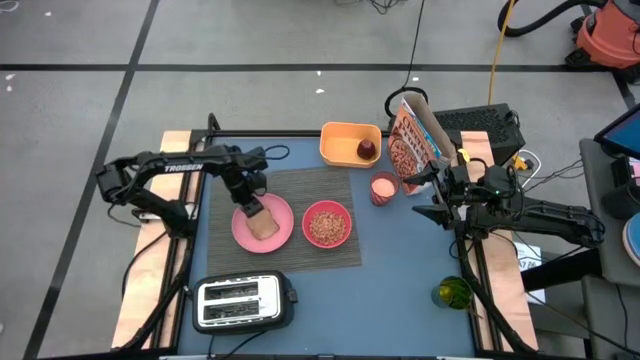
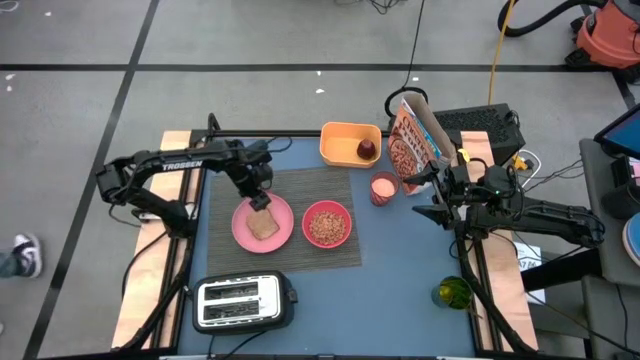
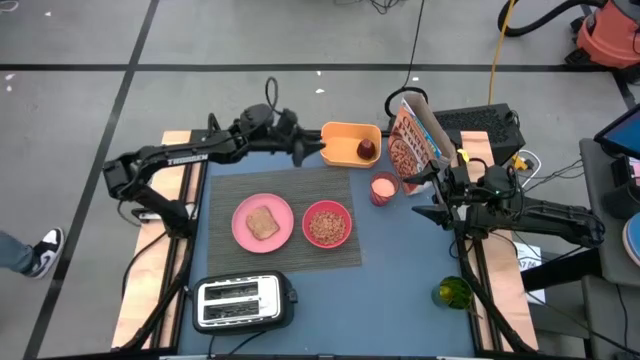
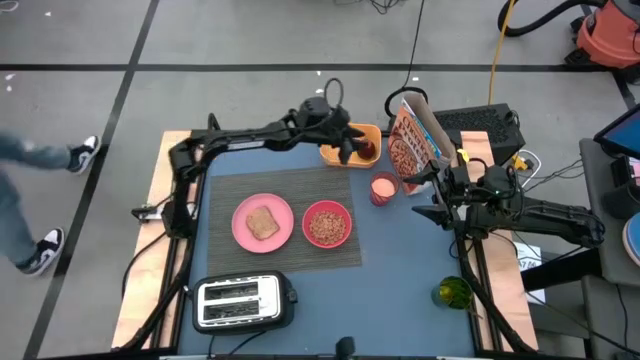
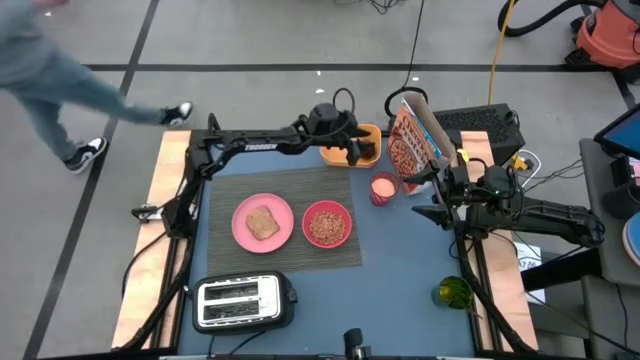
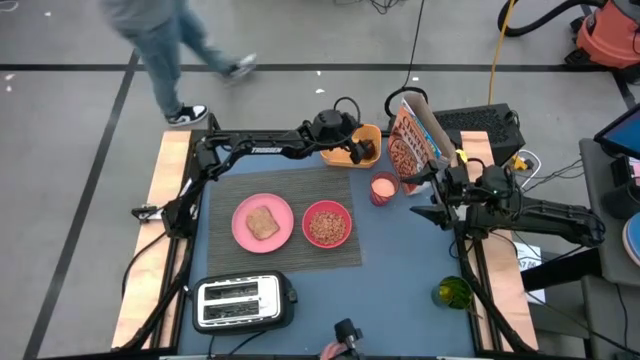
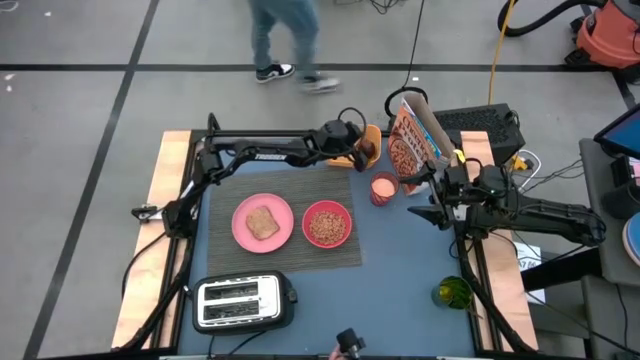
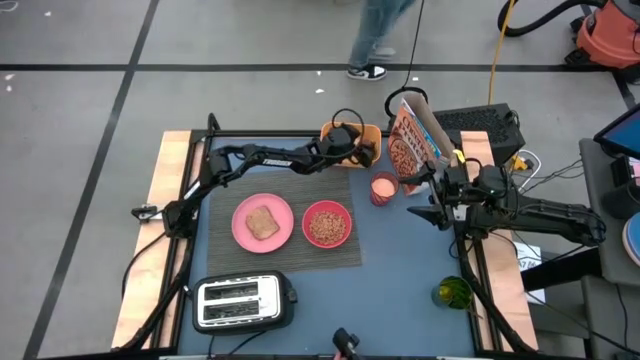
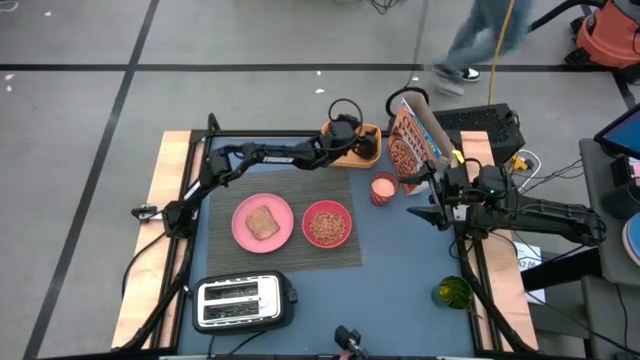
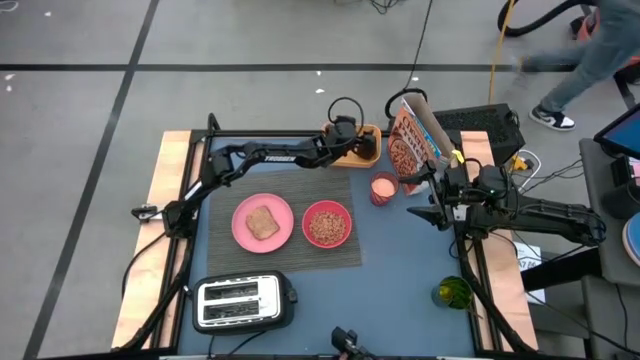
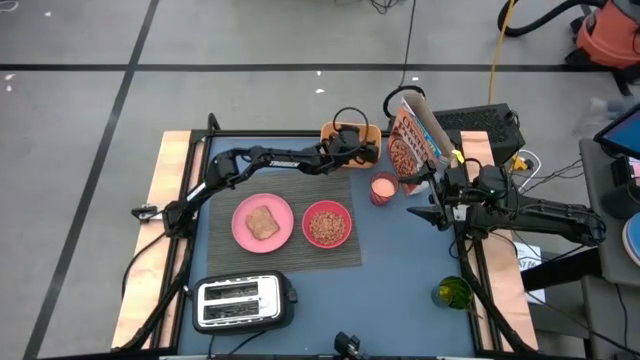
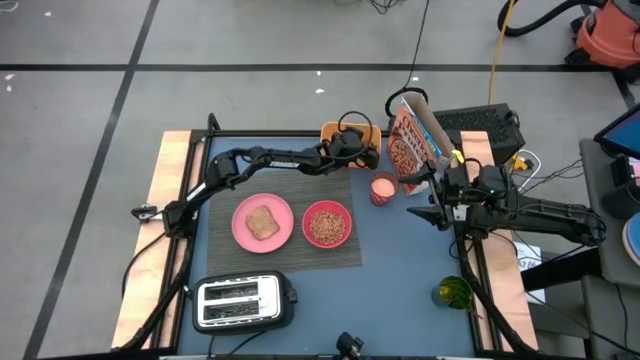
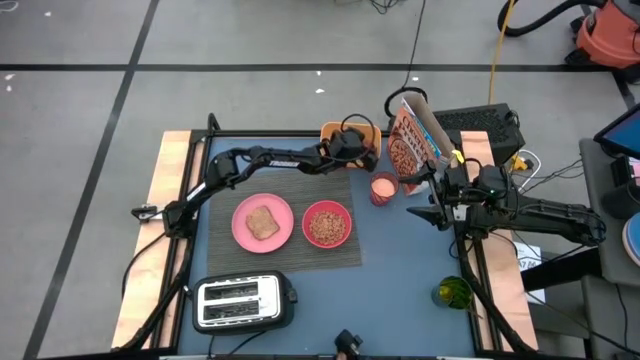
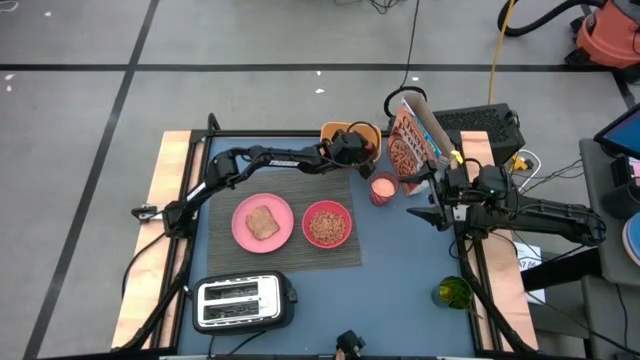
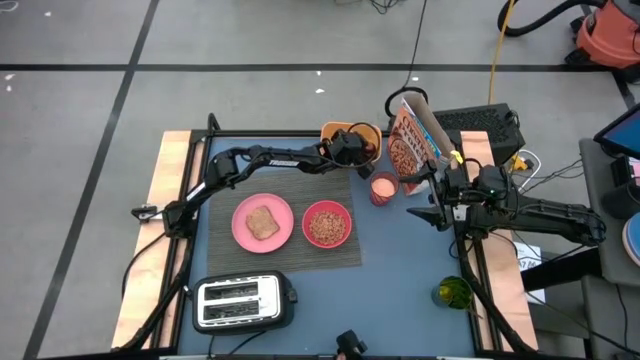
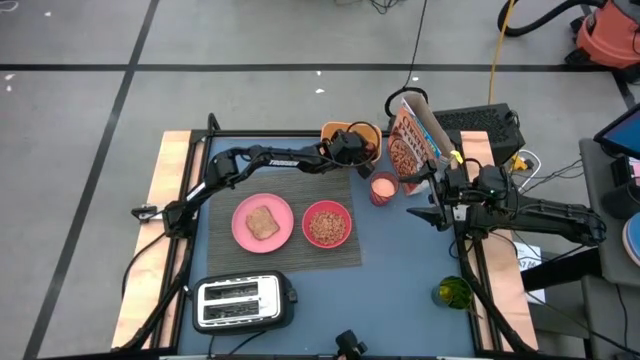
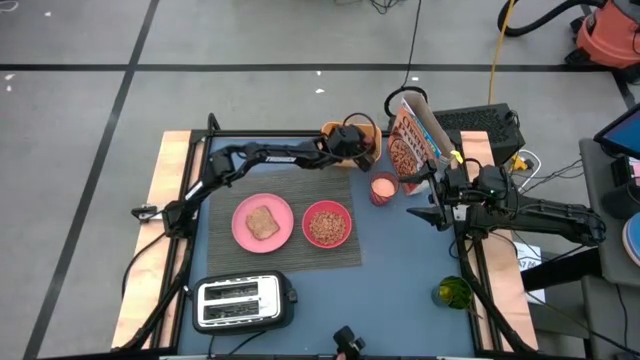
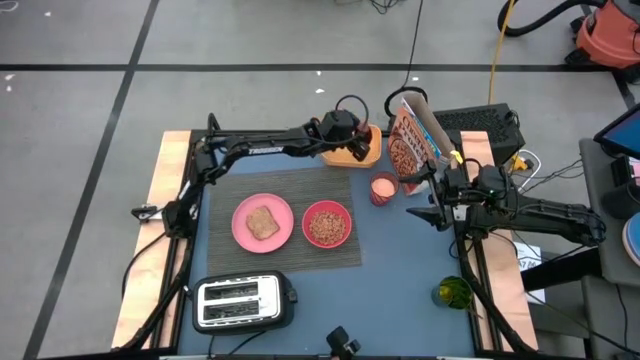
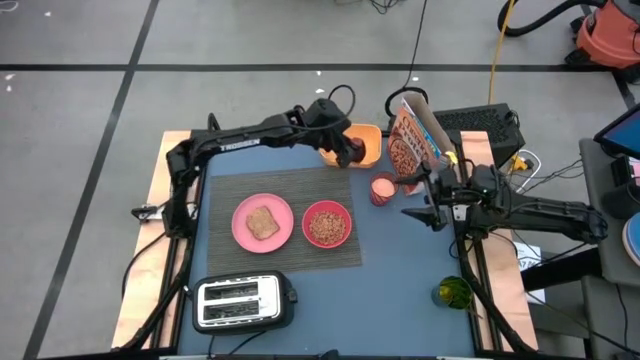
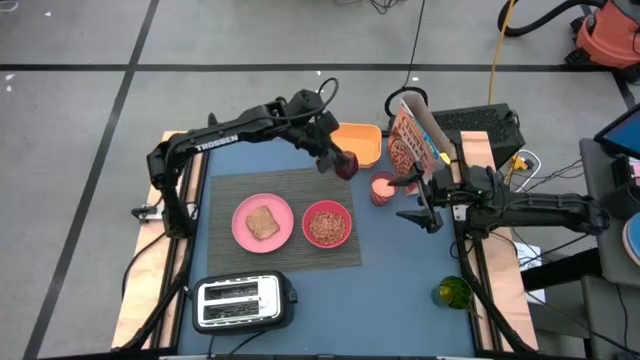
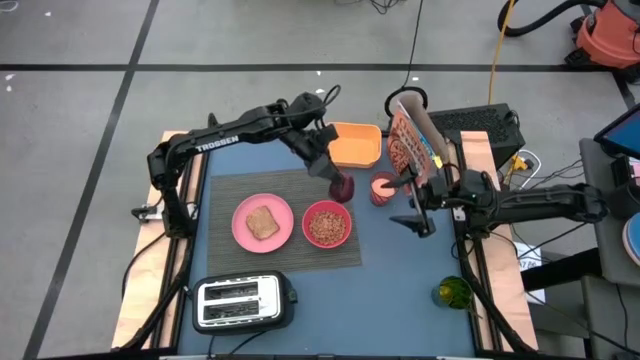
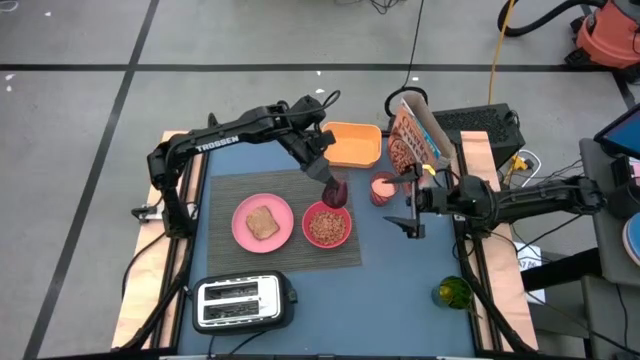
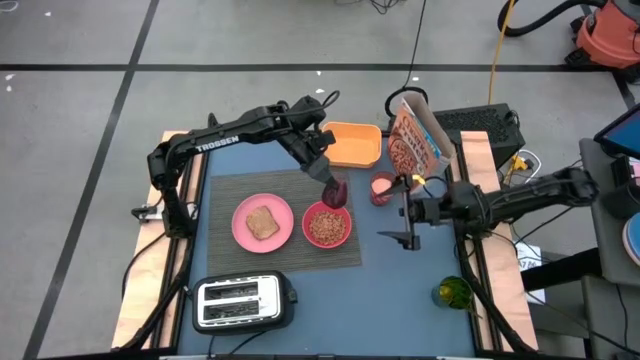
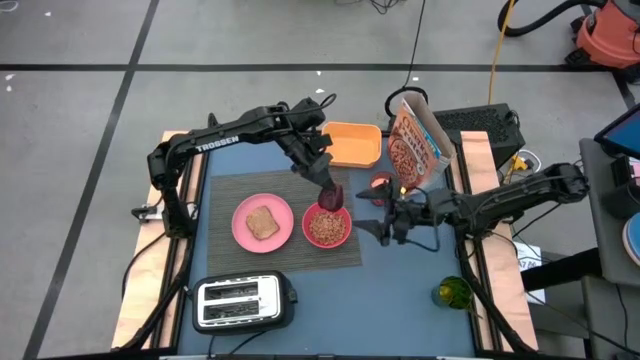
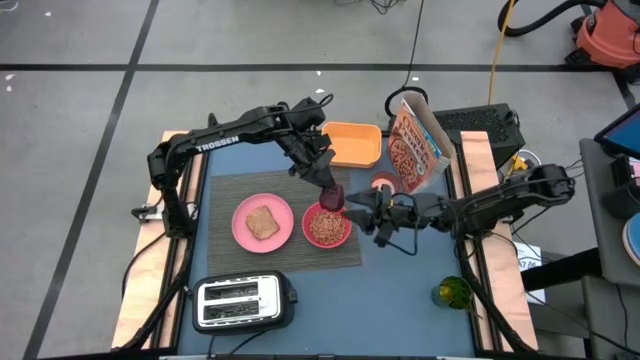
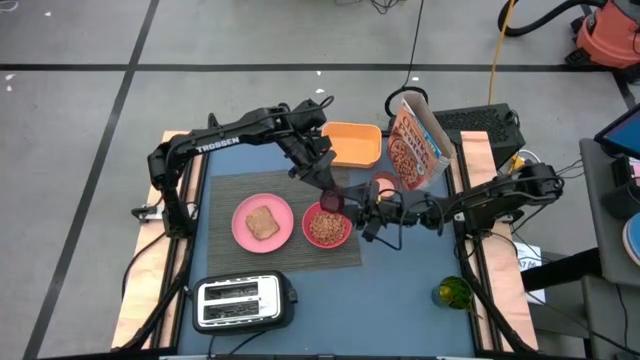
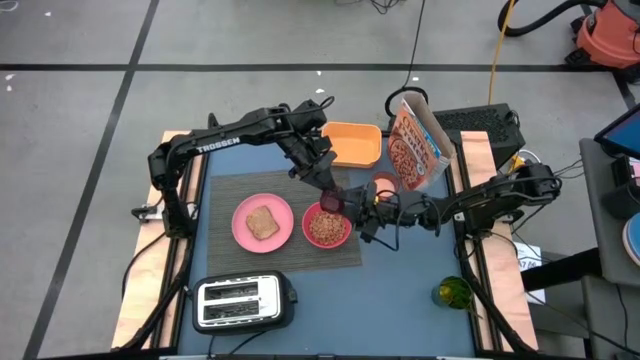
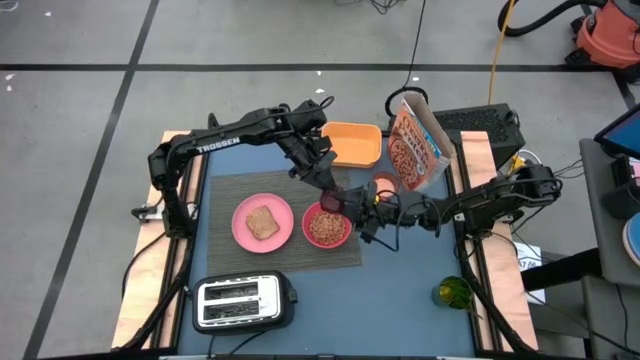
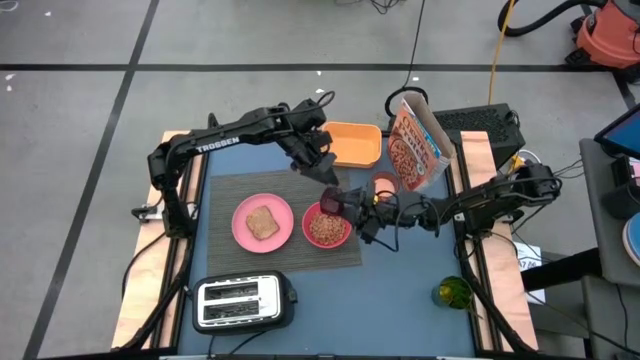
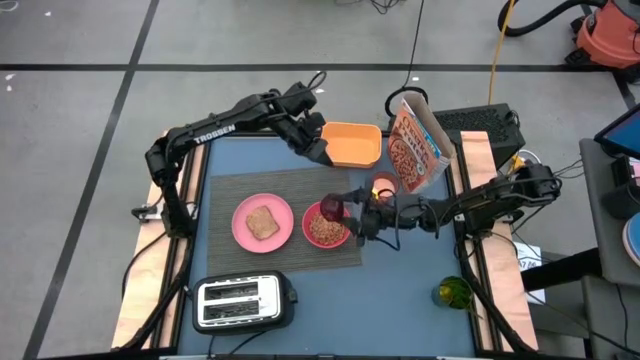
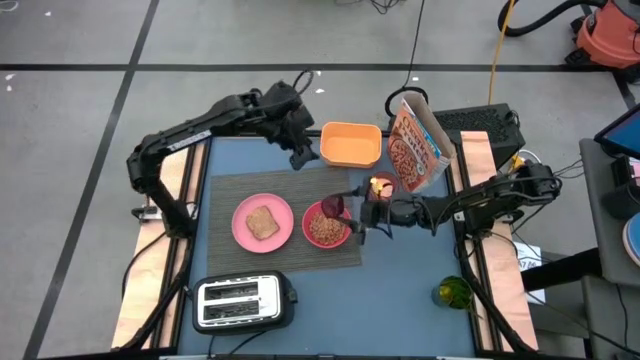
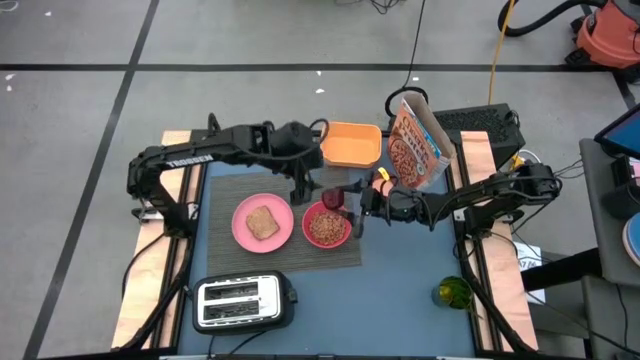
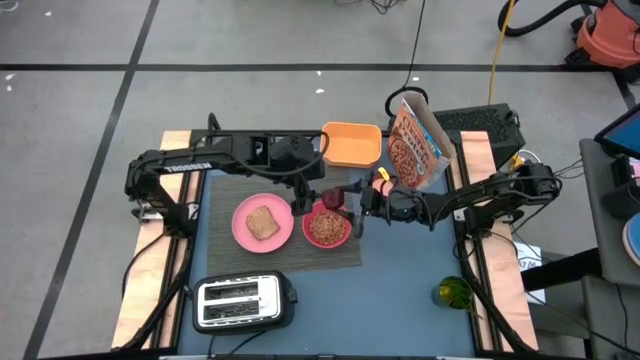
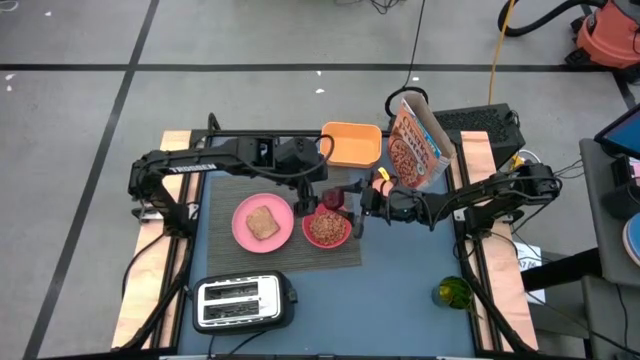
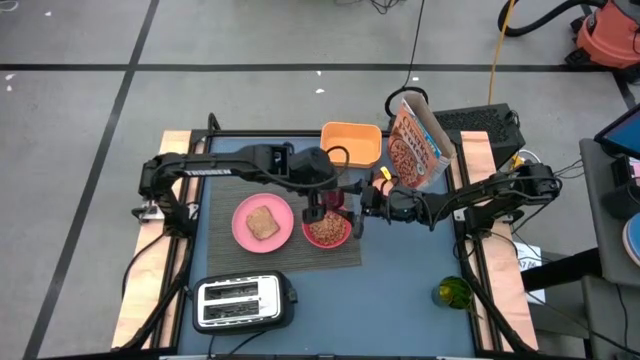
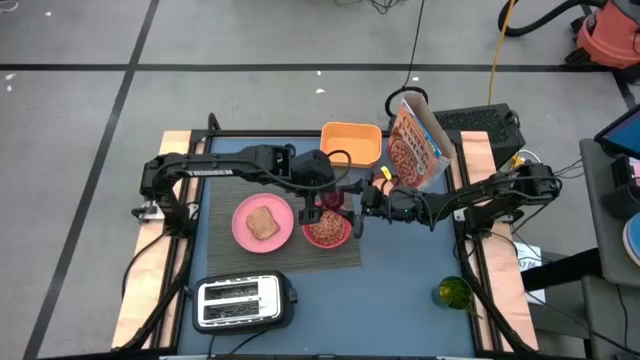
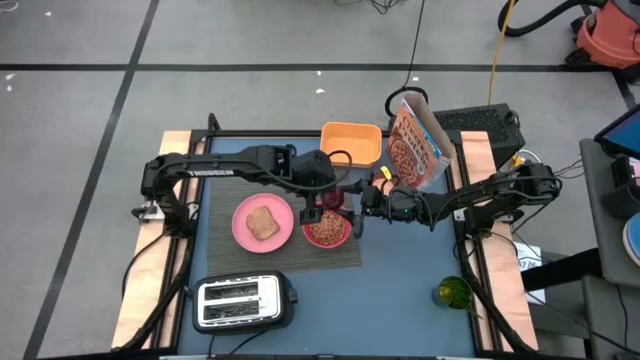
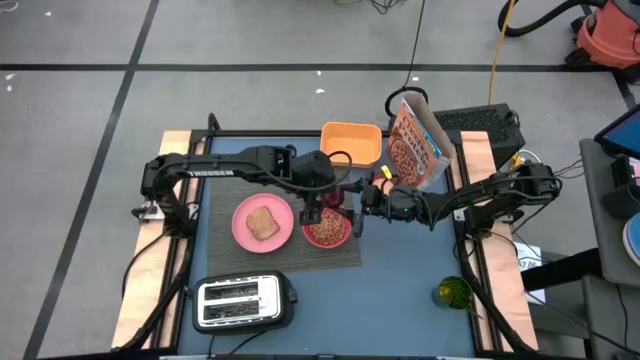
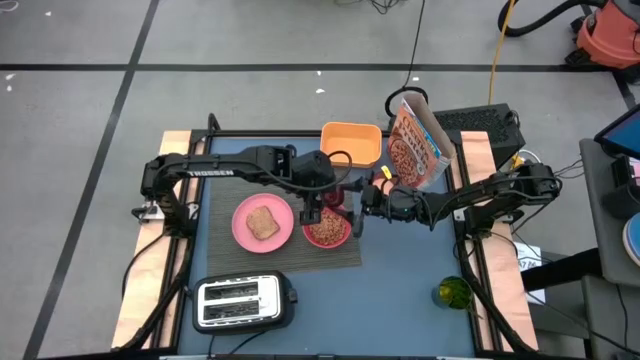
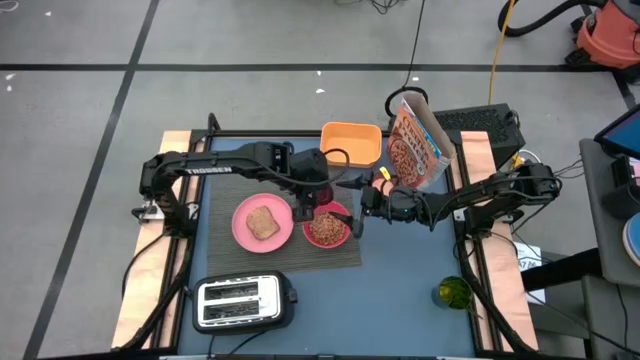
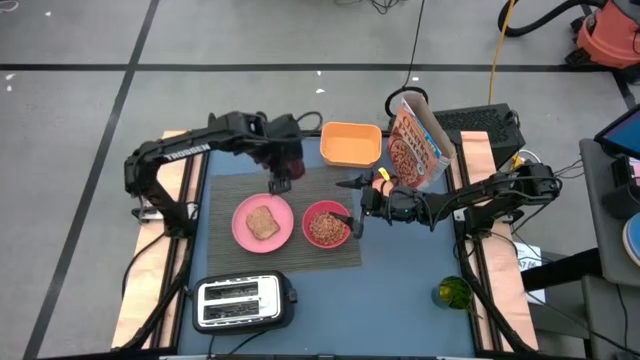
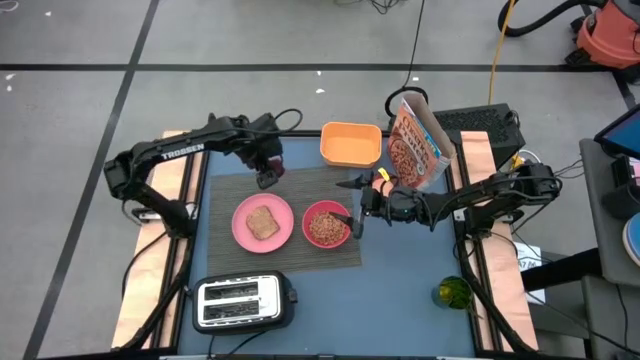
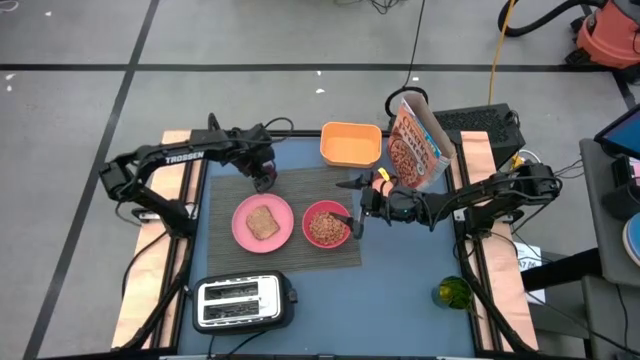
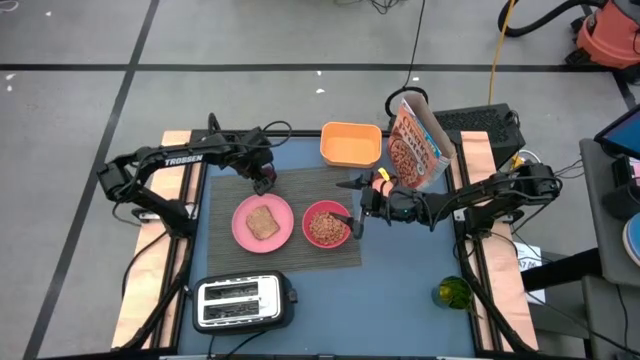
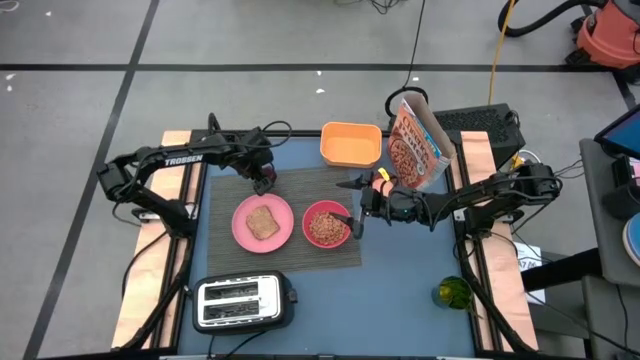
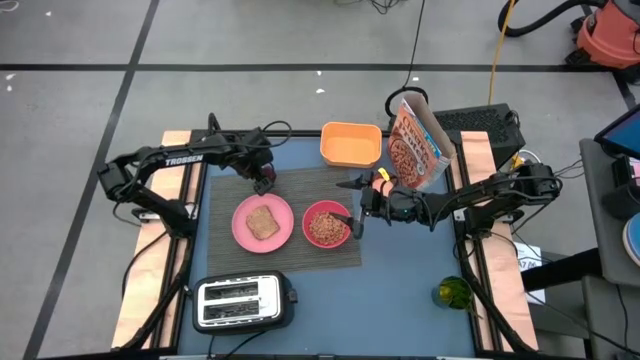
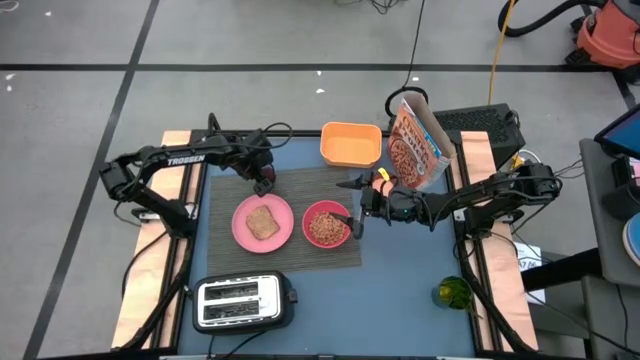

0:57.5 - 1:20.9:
Task: Arrange a breakfast setting
Put the apple on the gray table mat at the top right of the pink plate
